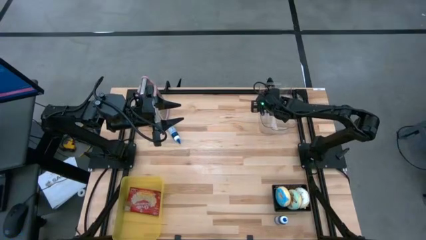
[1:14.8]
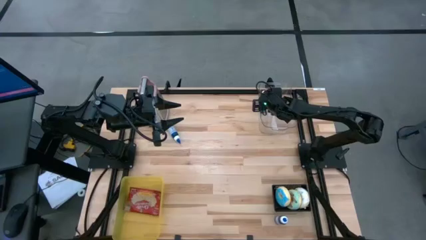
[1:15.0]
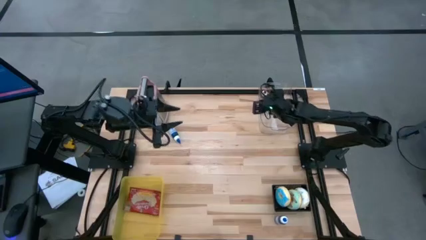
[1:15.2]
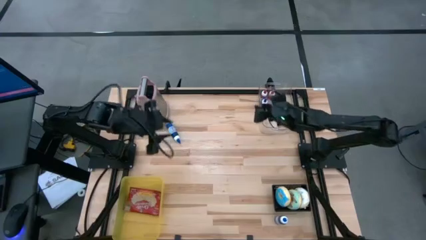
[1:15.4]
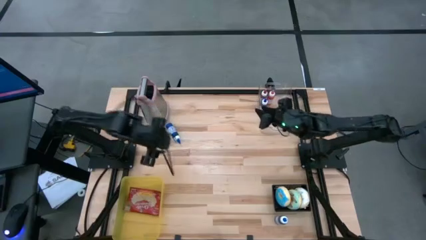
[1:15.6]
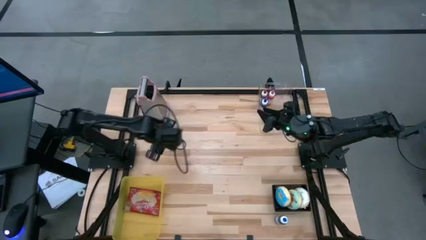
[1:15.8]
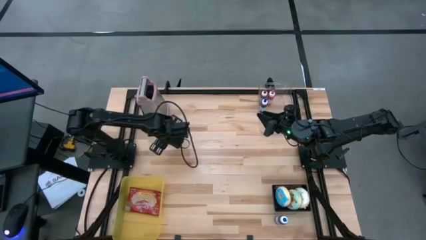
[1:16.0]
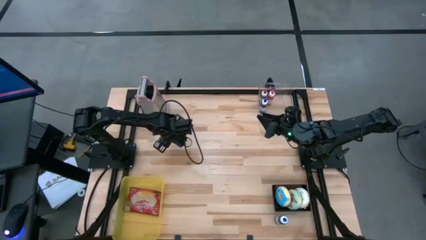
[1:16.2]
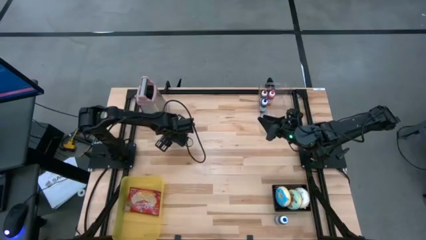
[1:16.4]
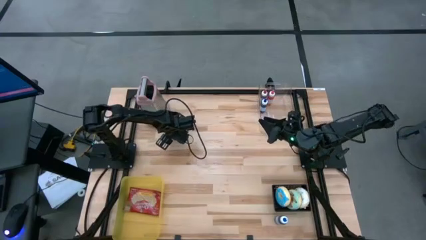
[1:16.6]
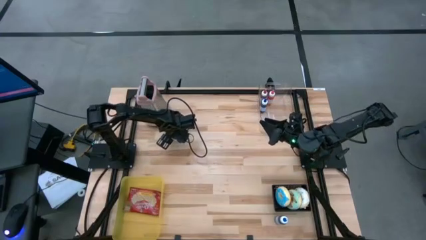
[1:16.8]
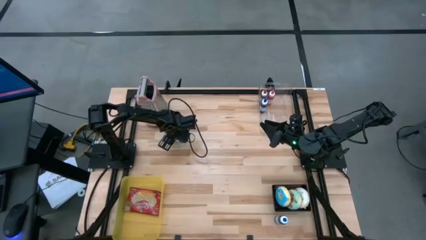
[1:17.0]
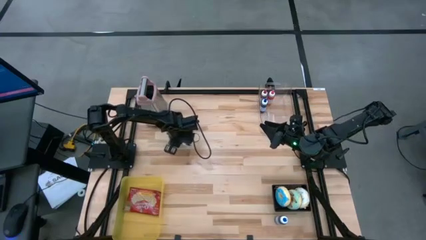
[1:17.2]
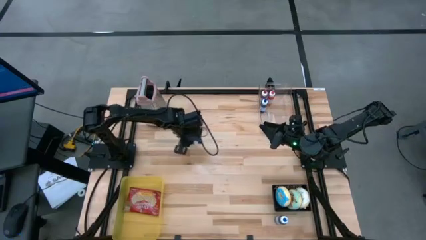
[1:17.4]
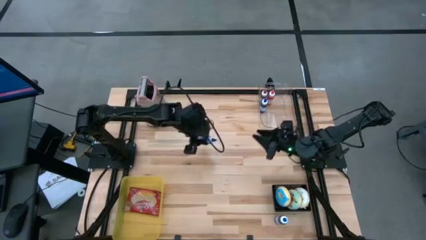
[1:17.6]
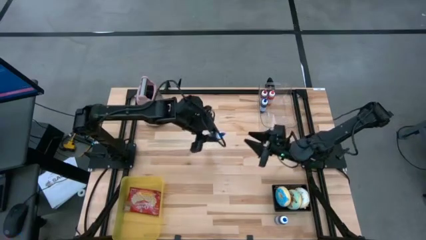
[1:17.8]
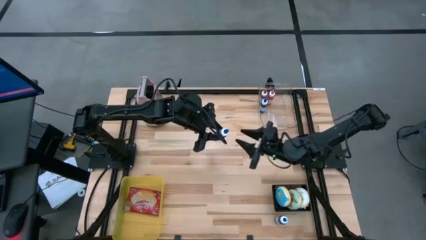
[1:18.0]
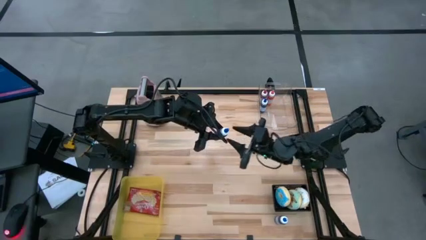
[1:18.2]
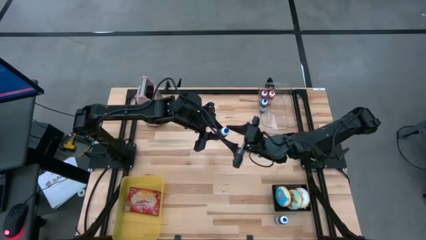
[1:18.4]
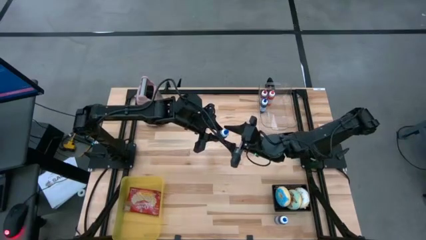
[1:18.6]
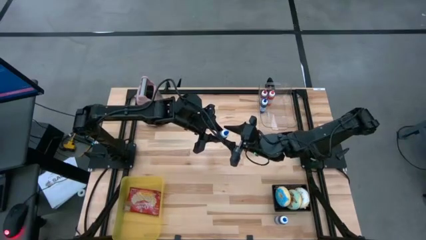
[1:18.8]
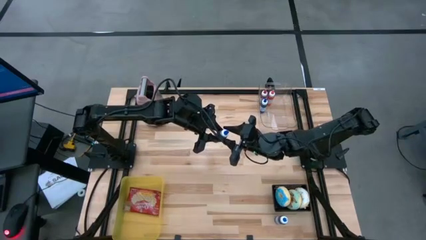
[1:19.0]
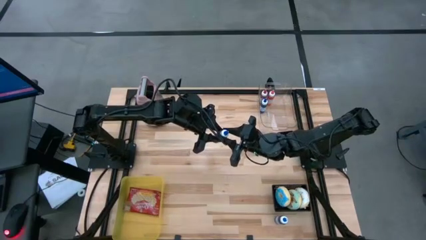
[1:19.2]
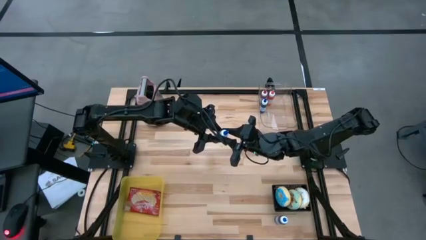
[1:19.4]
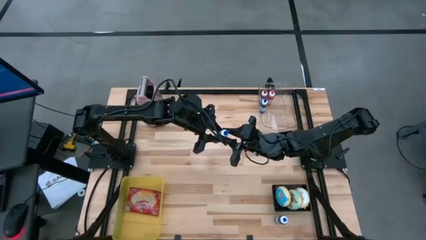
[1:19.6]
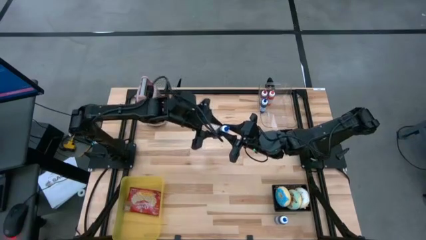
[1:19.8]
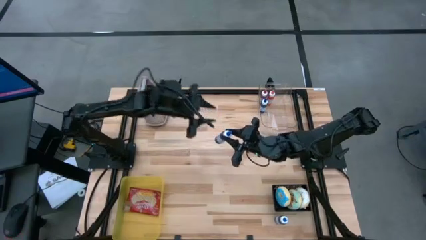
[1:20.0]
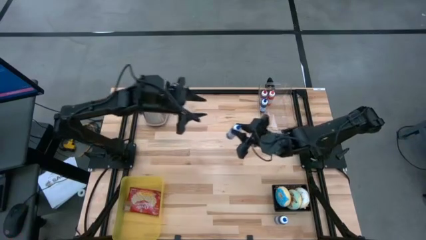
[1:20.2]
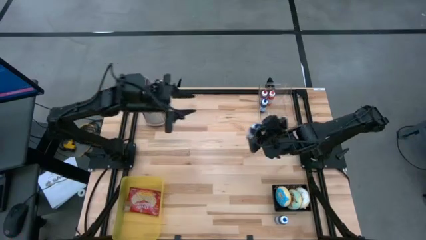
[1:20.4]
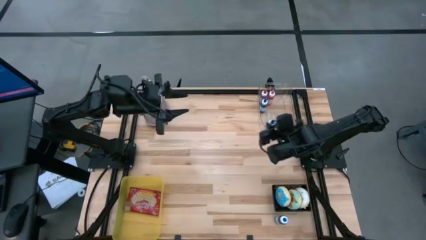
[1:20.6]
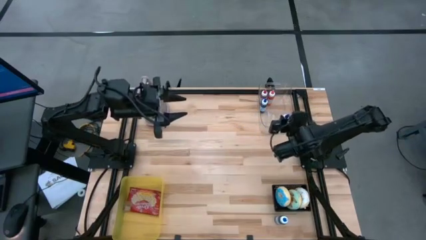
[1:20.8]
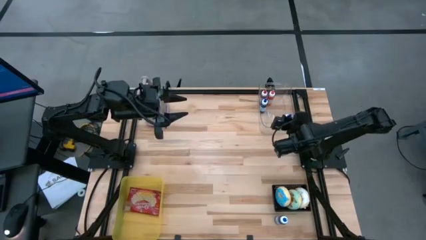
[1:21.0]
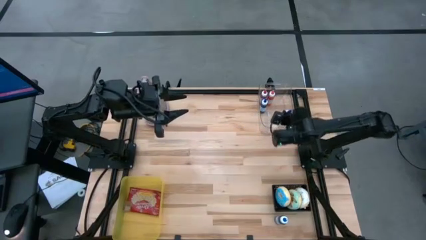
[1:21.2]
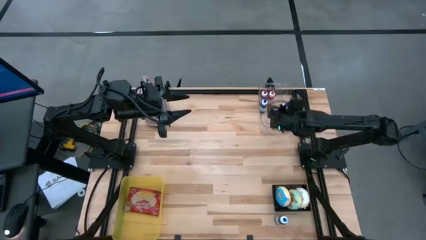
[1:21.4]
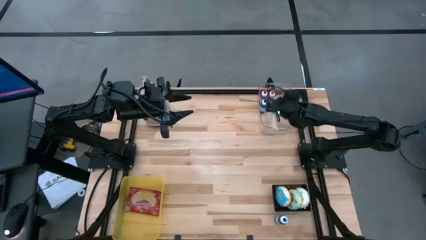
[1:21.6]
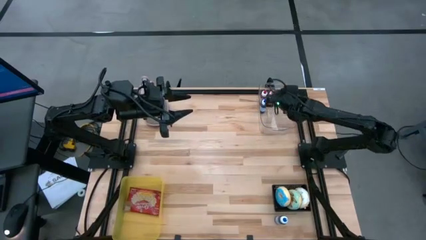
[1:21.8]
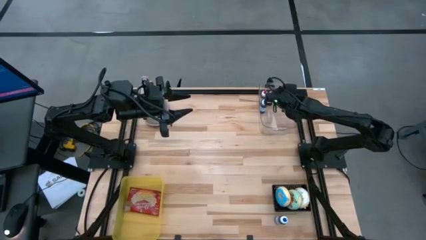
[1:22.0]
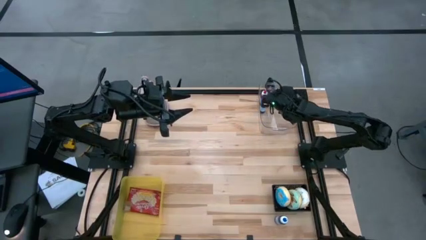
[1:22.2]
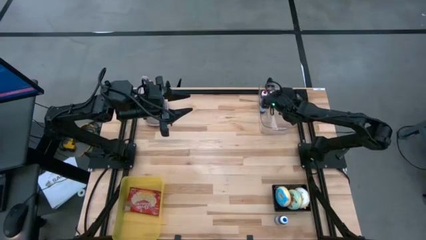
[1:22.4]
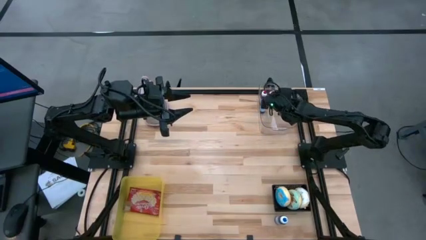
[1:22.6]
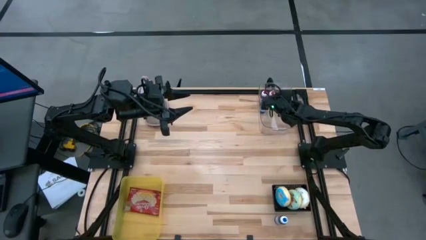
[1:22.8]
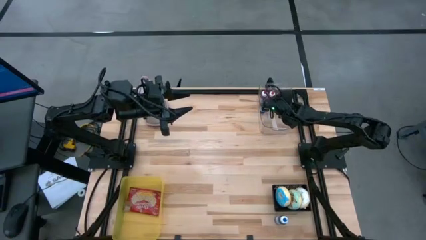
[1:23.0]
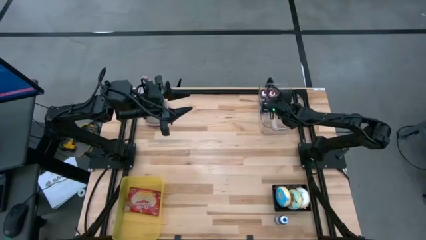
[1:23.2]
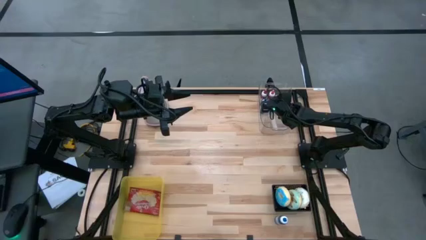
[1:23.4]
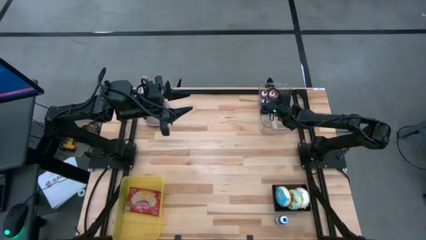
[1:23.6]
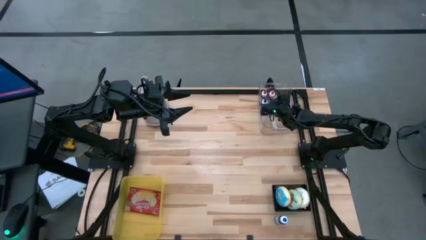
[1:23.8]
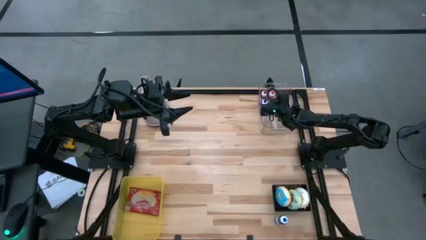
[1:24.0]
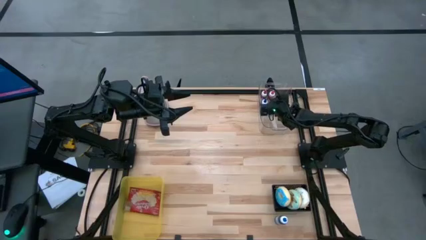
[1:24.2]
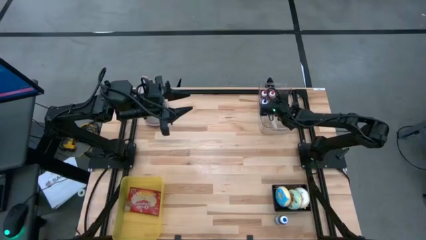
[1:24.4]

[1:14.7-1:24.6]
Put the left blue food coloring bottle into the transparent bin
